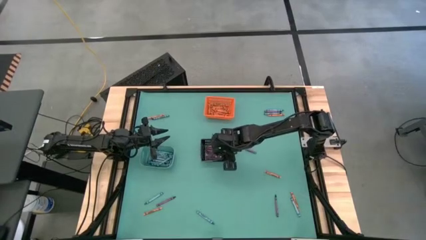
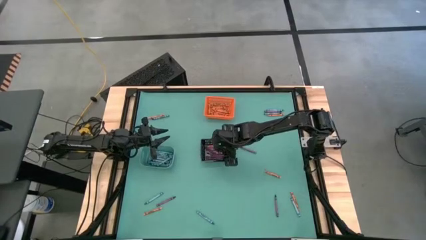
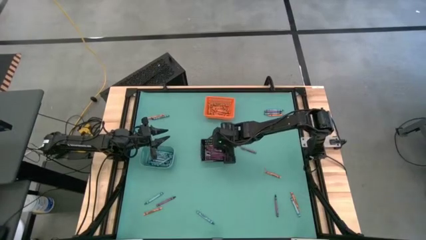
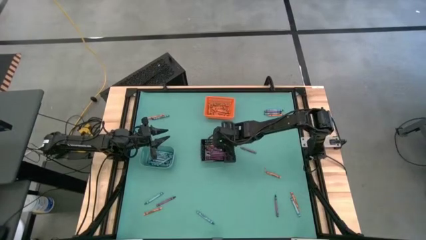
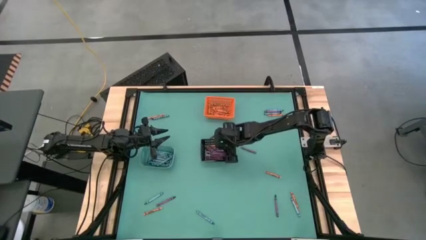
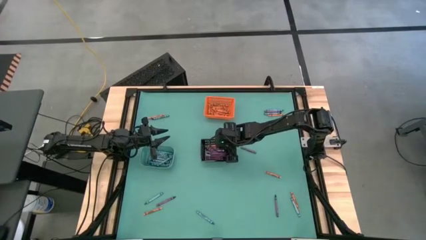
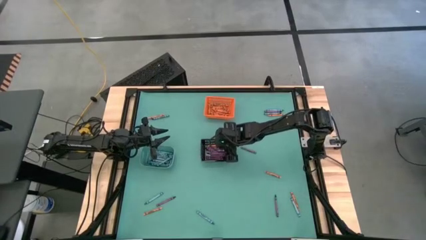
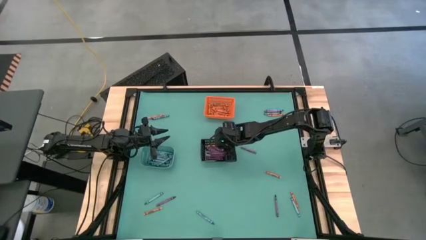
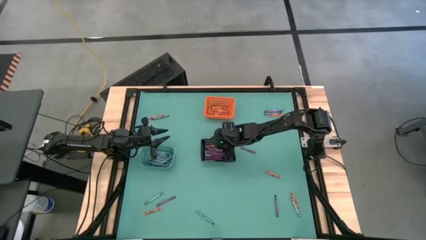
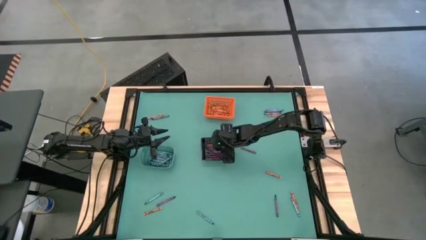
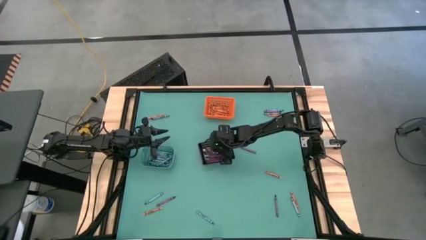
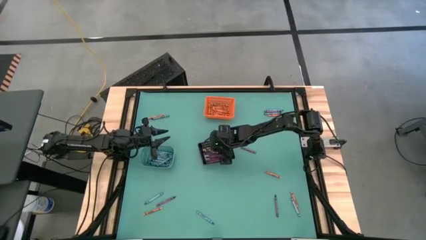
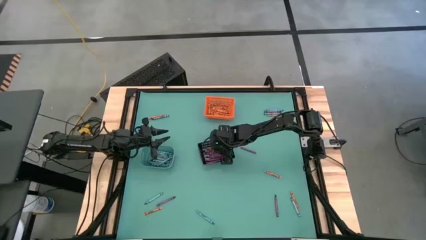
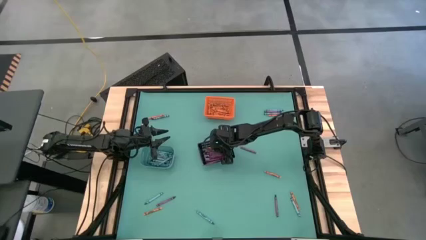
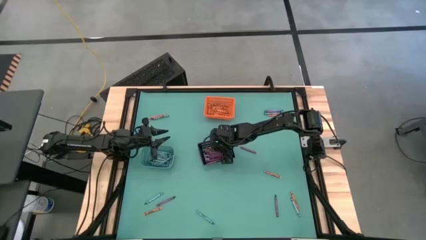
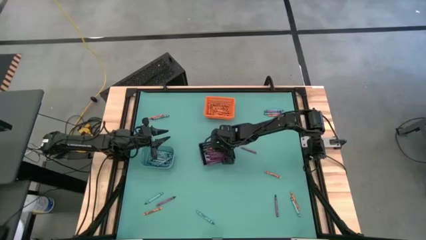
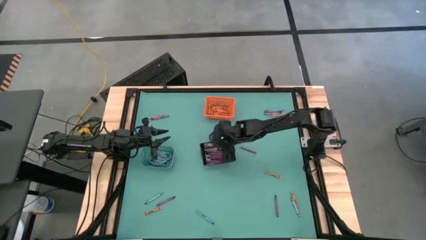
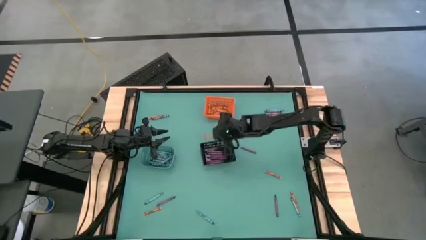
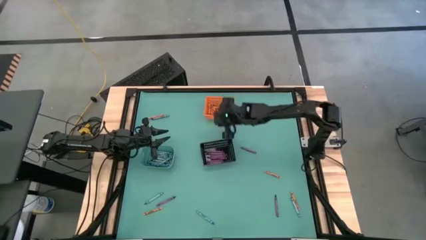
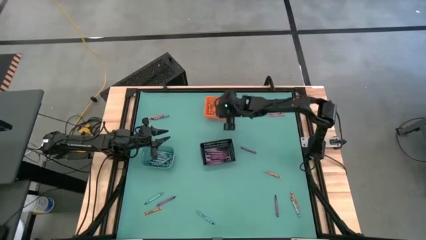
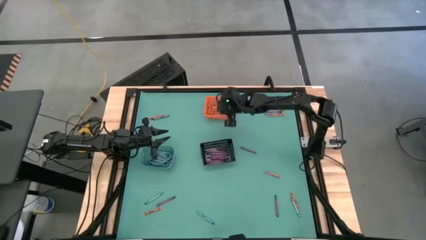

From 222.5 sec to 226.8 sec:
Task: Sort crayons
Put the orange crayon into the orange bin

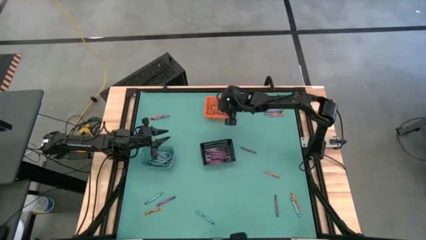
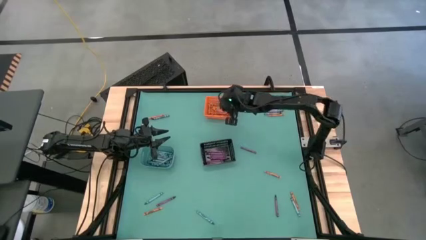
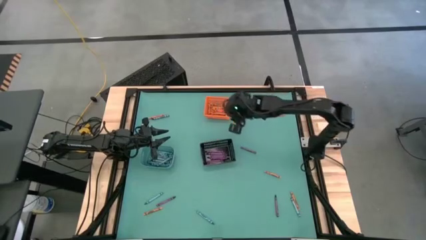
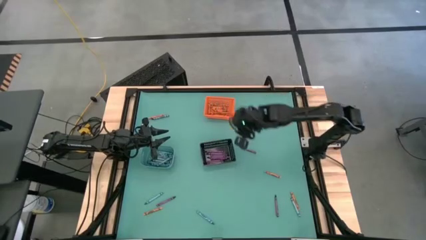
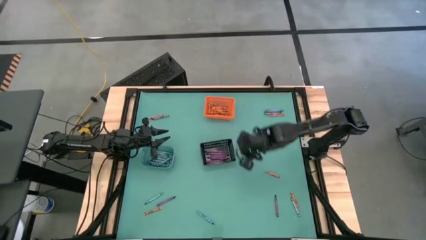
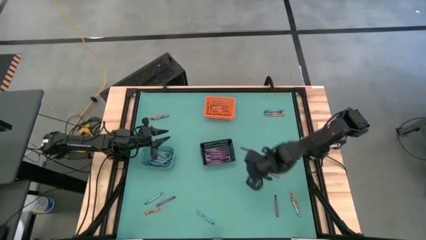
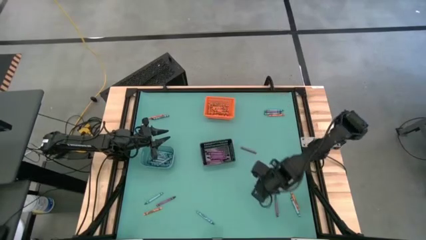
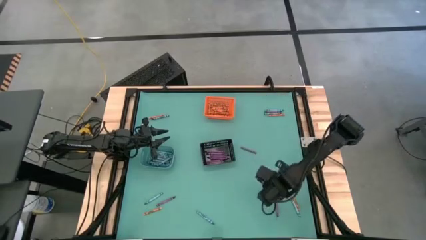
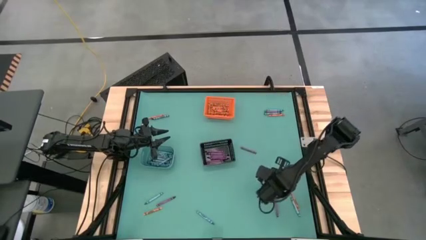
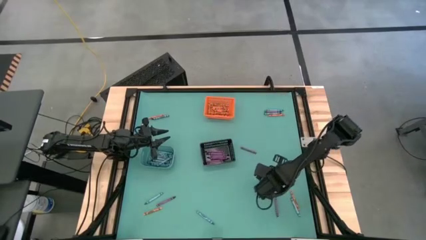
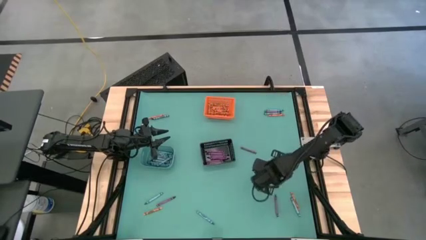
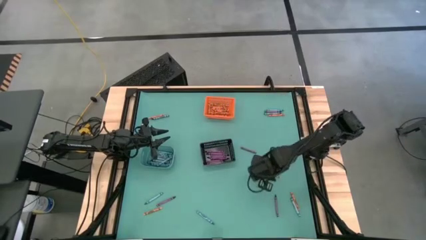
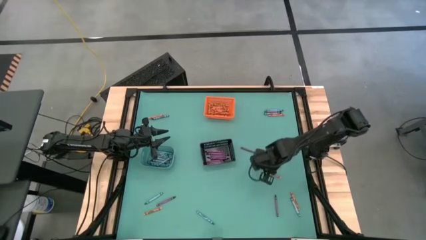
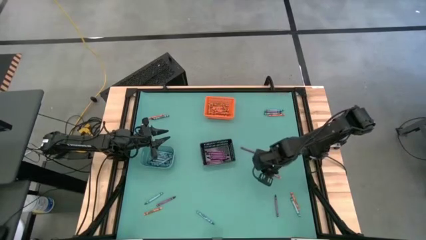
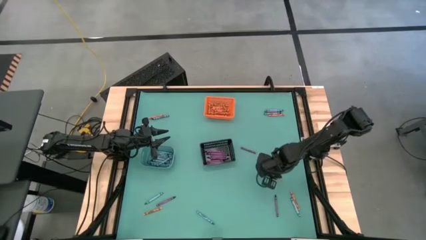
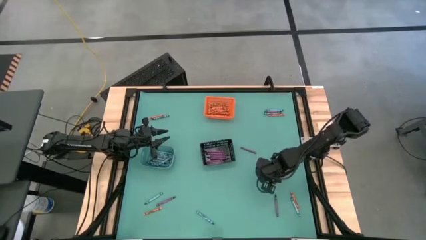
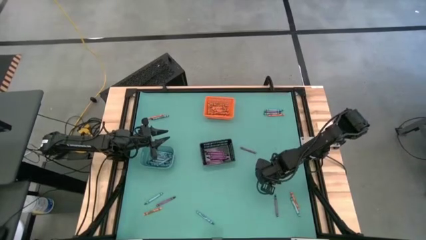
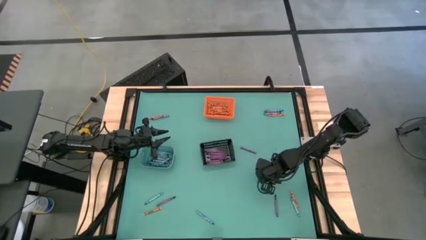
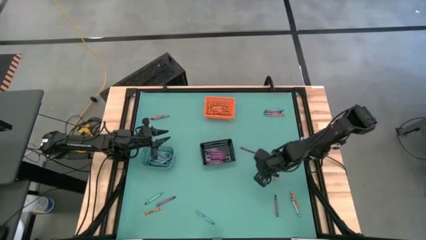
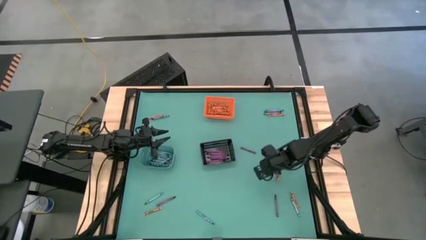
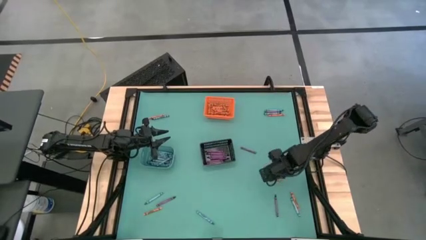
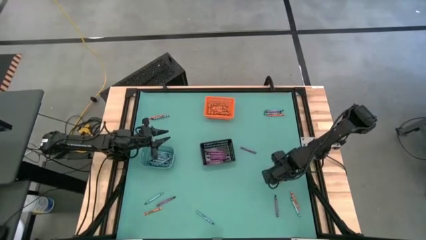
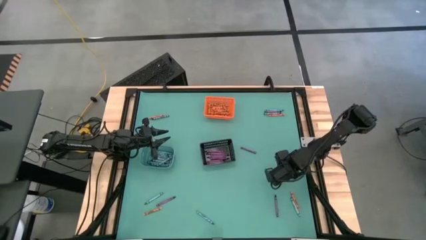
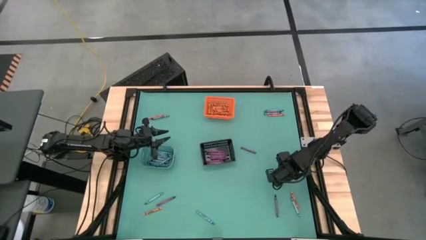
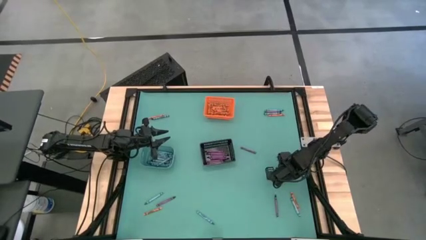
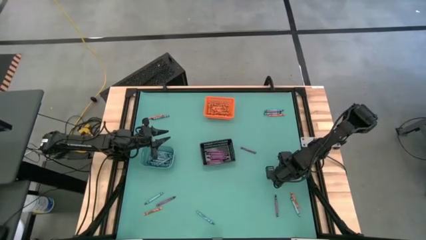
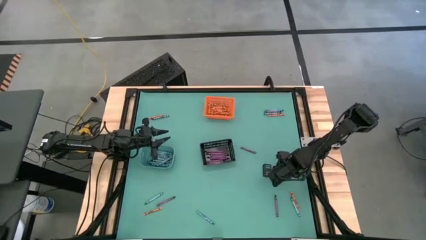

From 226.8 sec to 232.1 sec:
Put the orange crayon into the orange bin

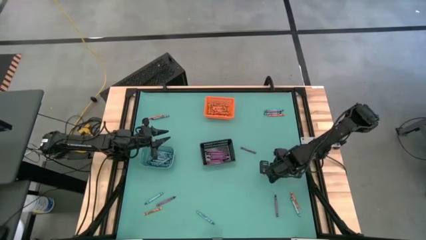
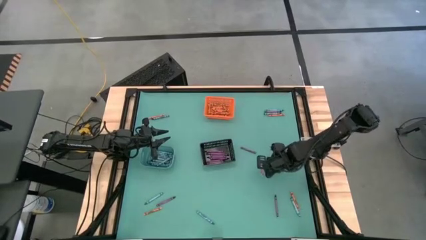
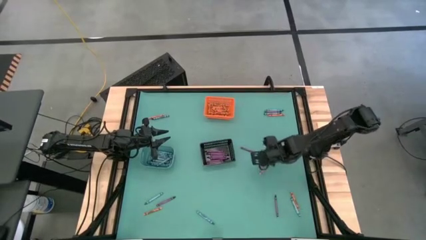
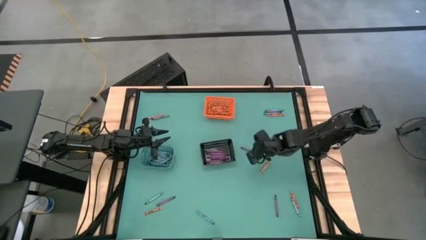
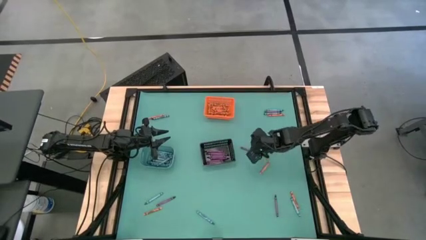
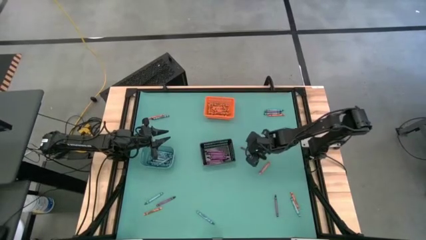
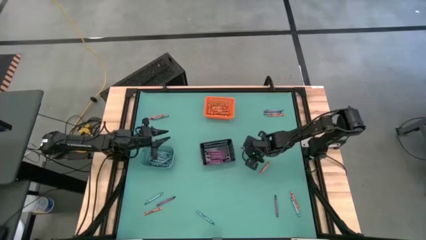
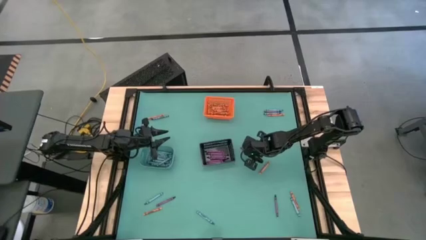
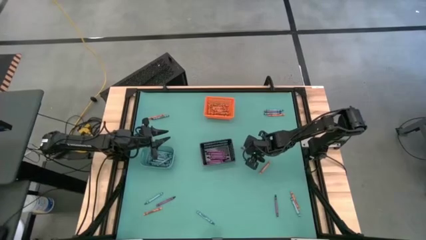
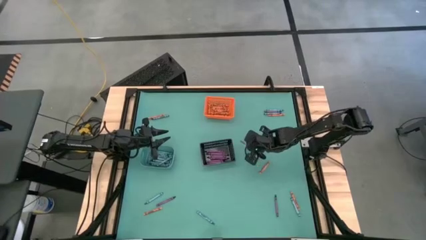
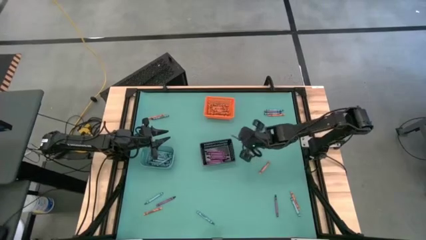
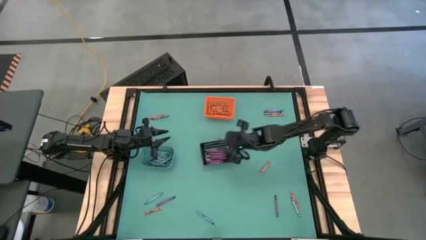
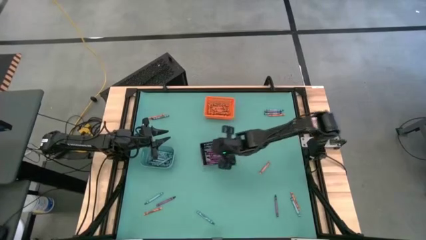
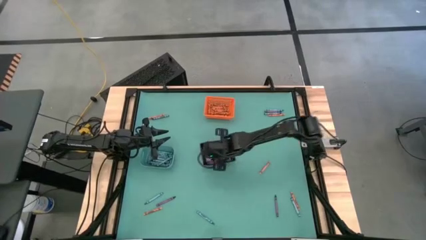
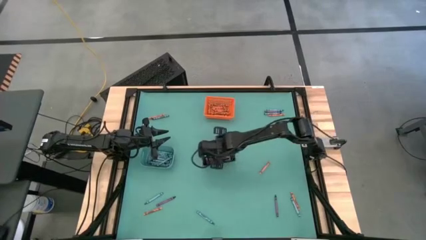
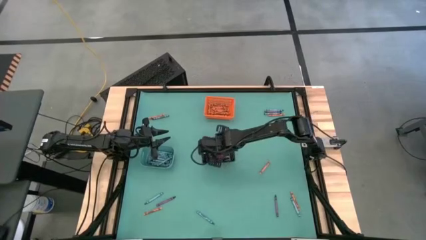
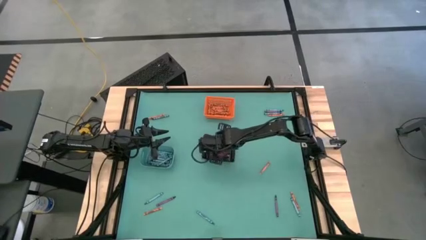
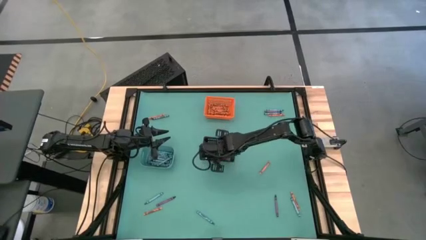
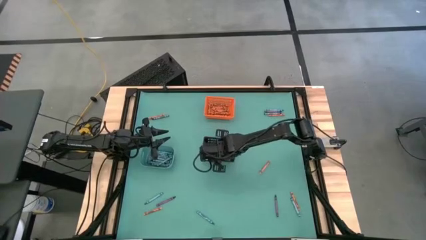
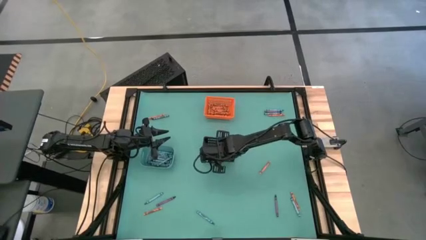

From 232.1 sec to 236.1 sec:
Put the violet crayon into the black bin

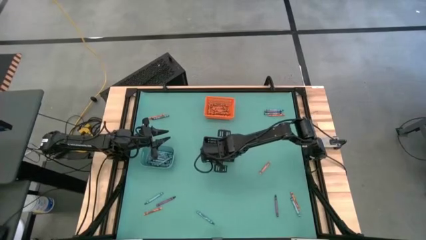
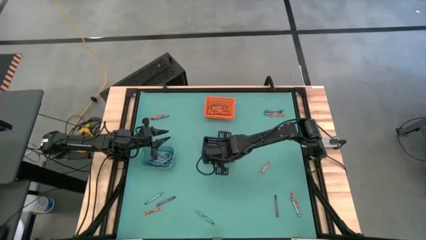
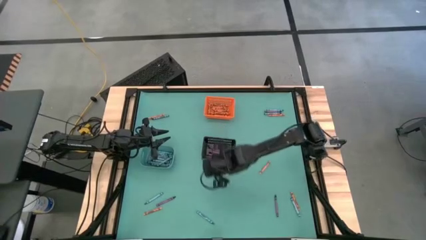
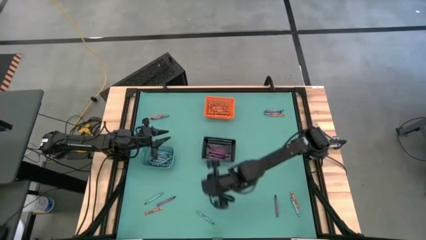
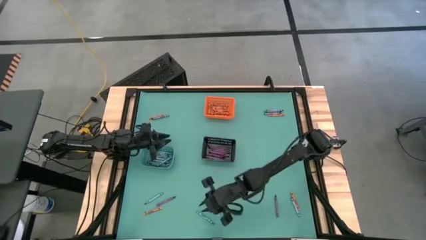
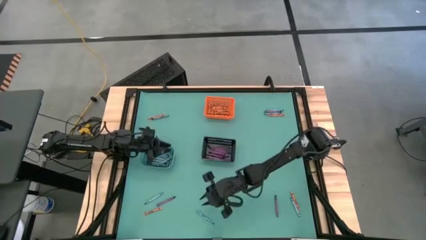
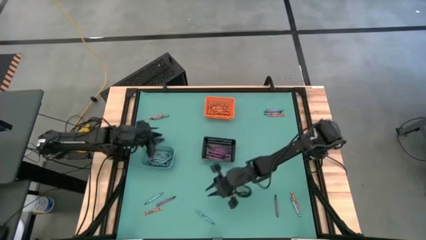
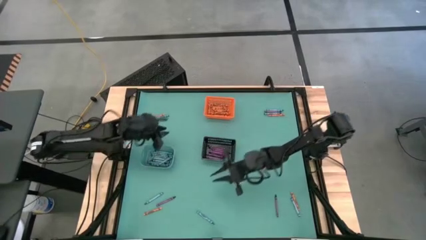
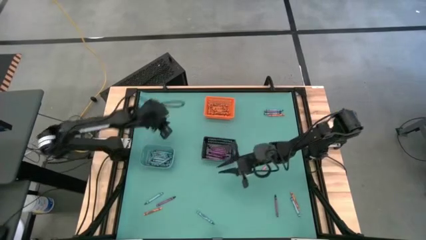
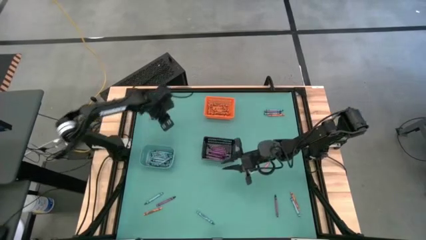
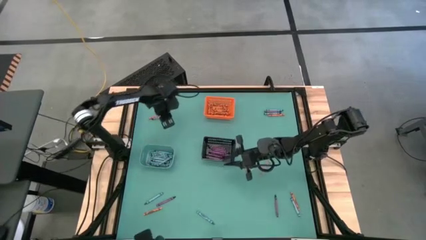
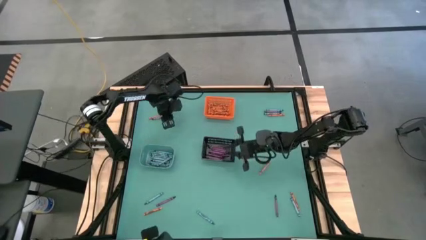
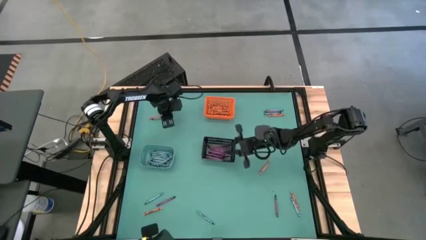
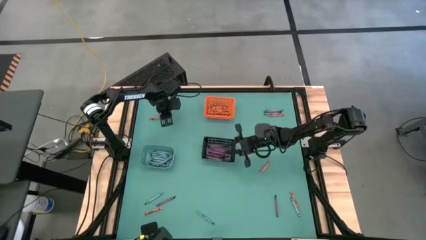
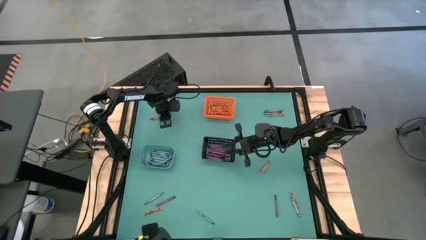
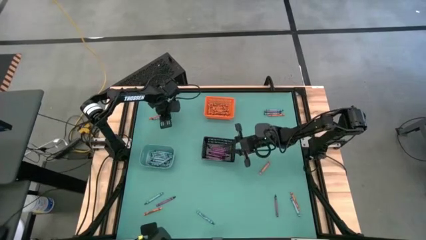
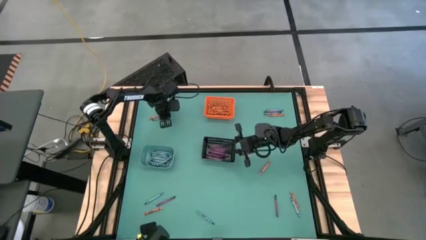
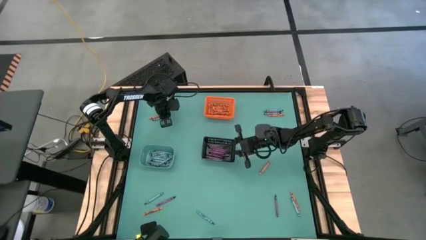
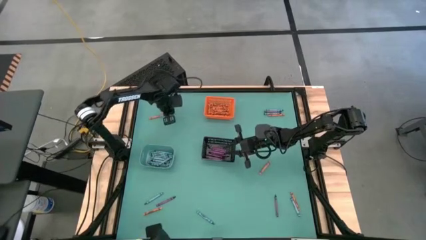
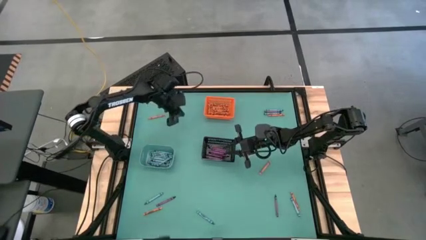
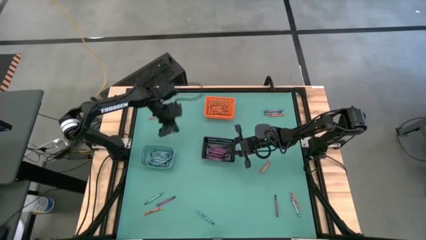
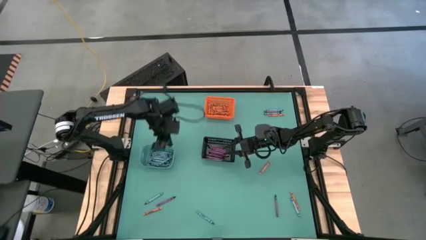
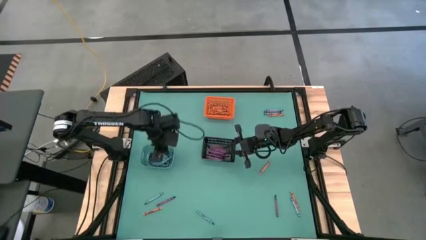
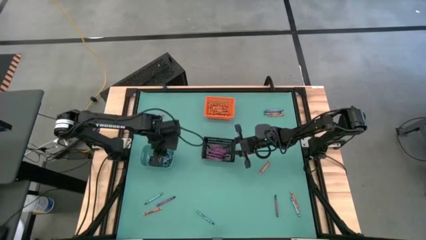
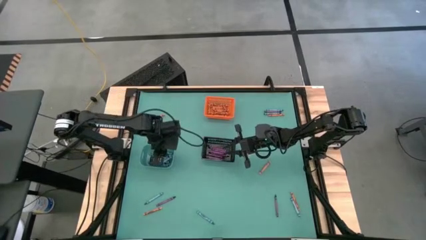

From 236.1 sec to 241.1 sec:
Put the blue crayon into the light blue bin
